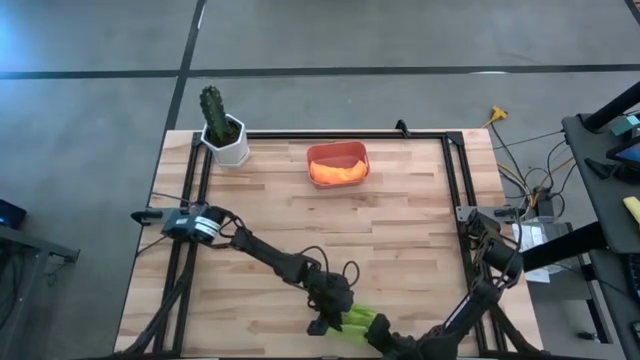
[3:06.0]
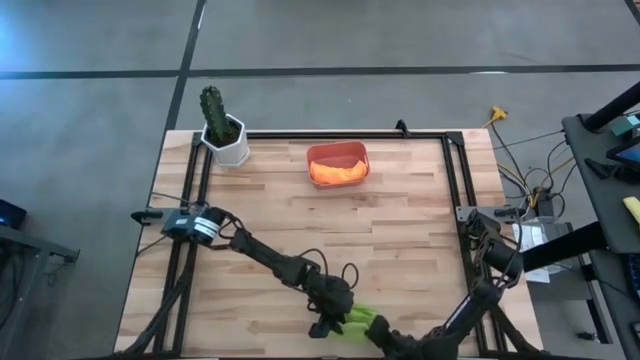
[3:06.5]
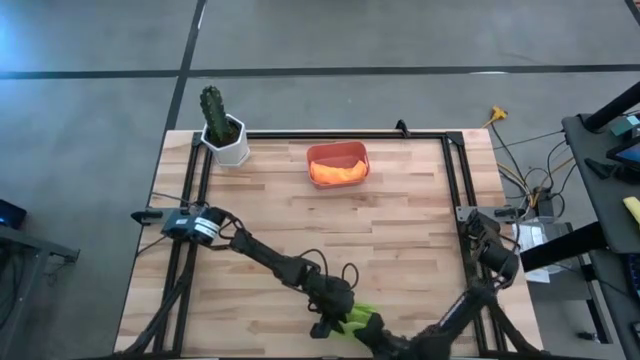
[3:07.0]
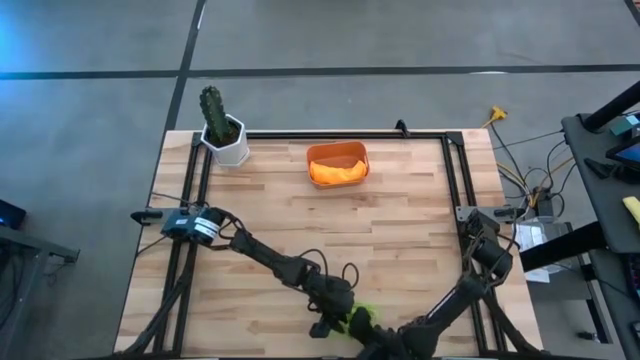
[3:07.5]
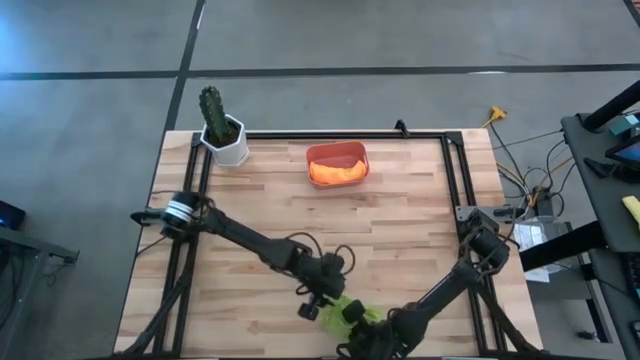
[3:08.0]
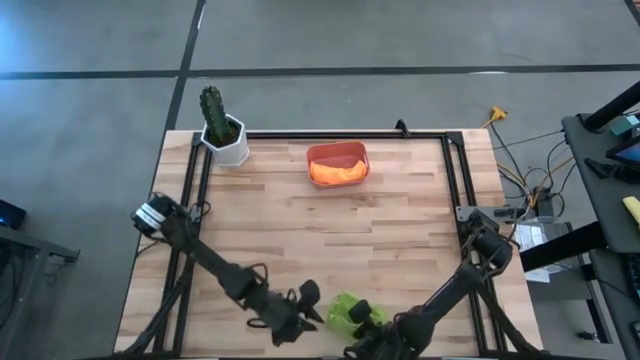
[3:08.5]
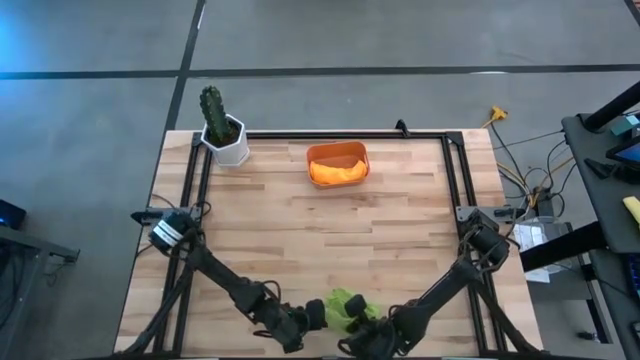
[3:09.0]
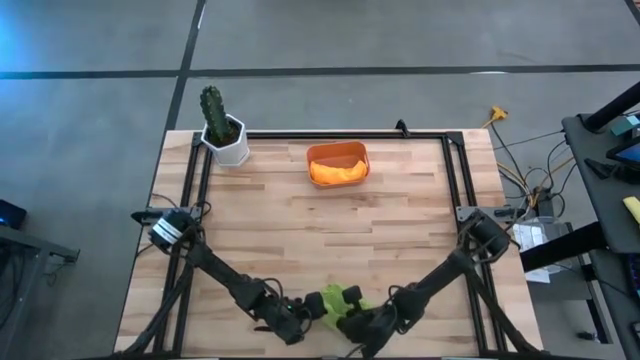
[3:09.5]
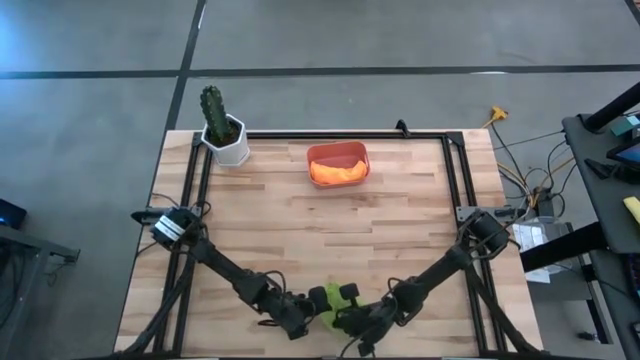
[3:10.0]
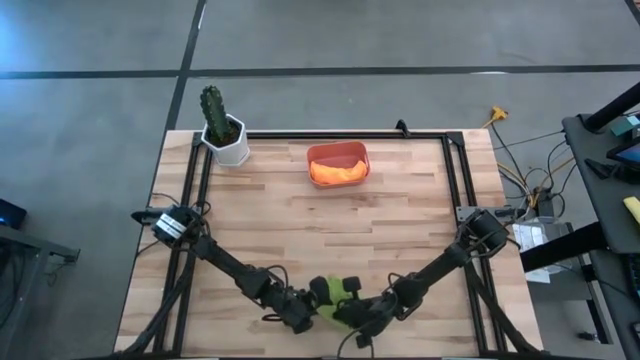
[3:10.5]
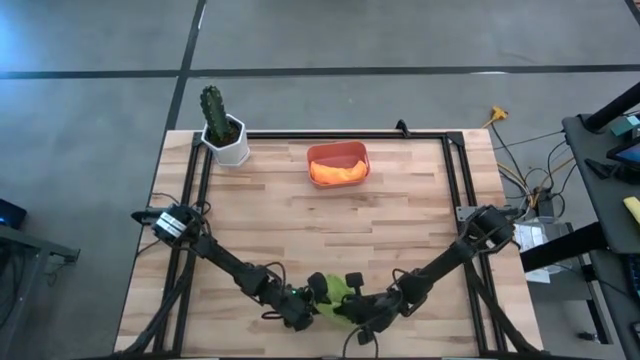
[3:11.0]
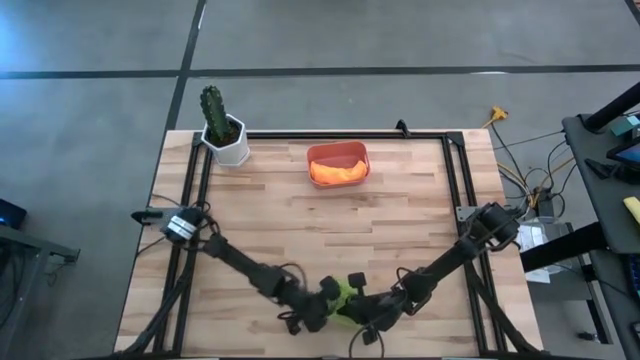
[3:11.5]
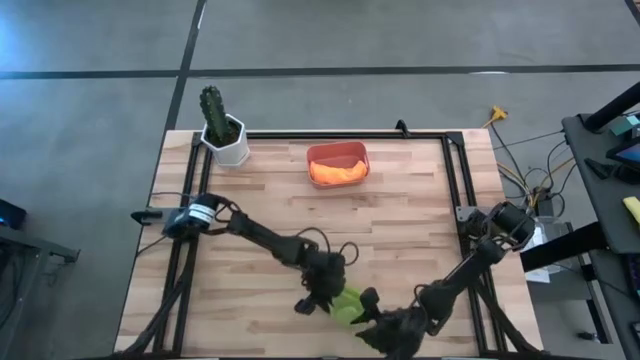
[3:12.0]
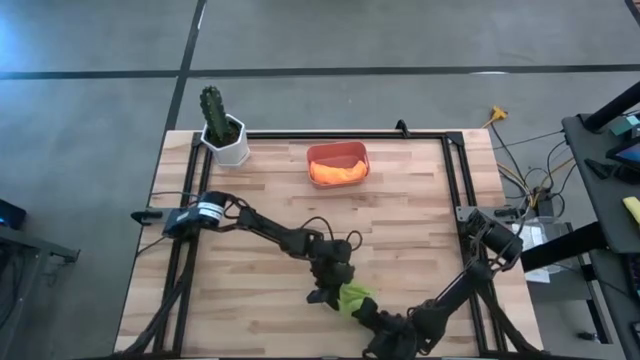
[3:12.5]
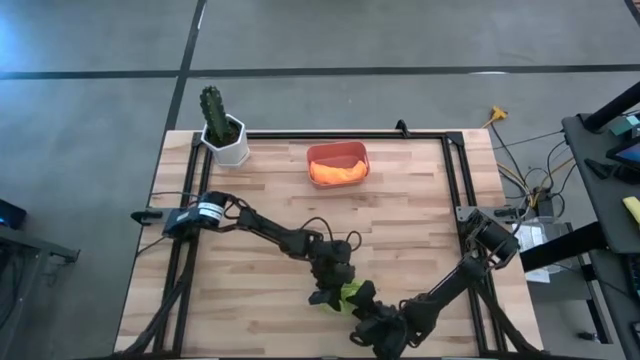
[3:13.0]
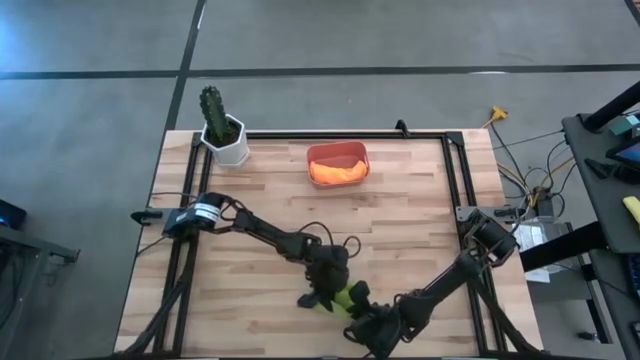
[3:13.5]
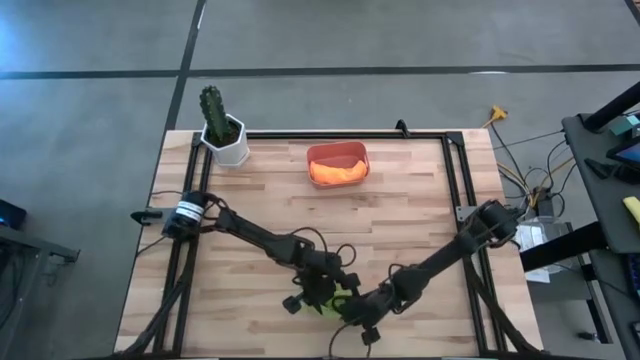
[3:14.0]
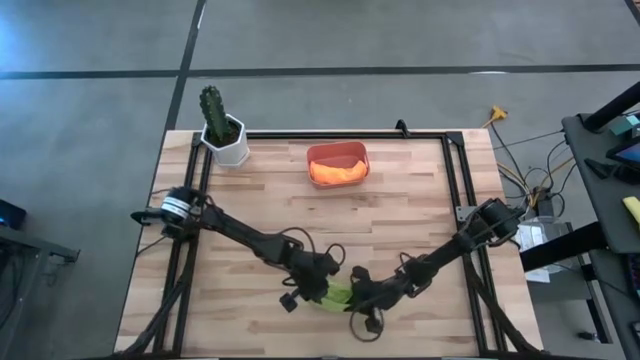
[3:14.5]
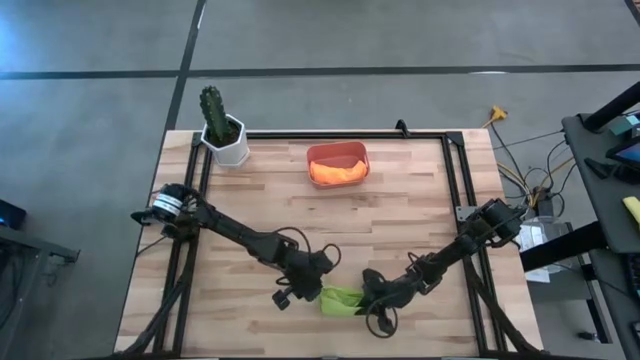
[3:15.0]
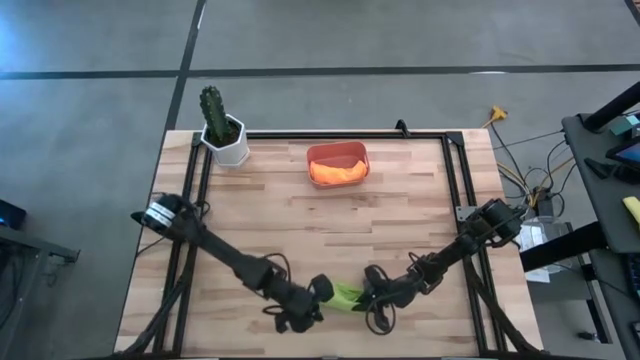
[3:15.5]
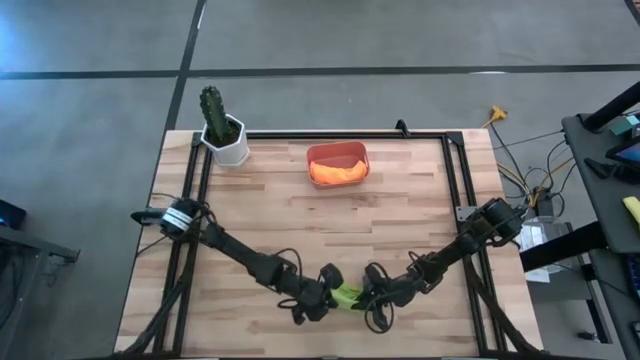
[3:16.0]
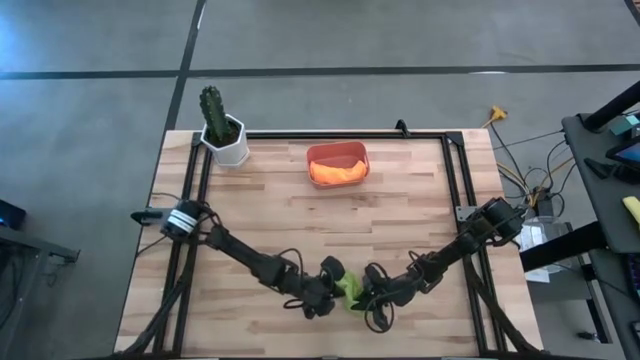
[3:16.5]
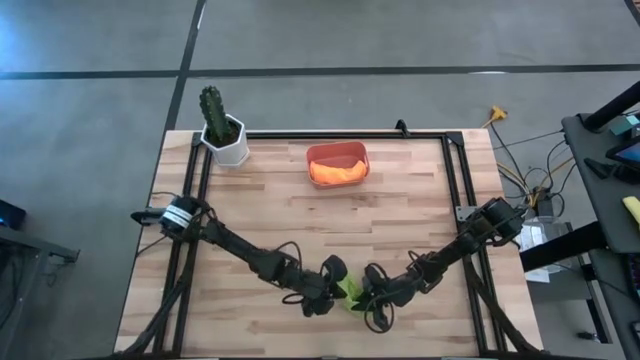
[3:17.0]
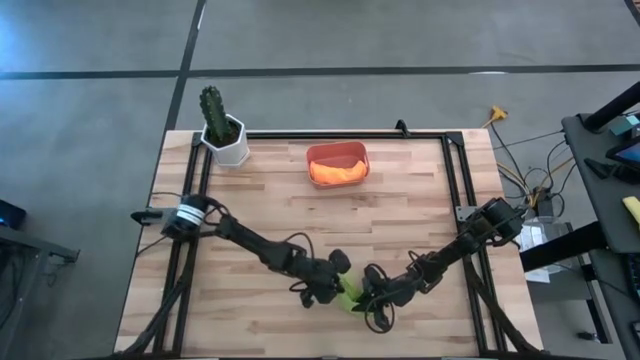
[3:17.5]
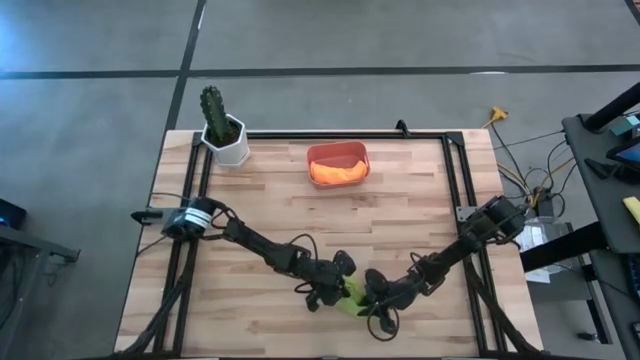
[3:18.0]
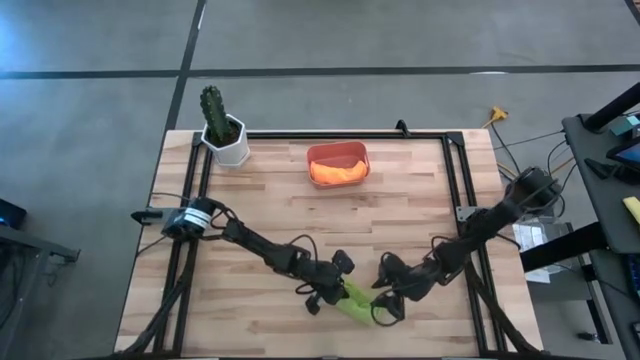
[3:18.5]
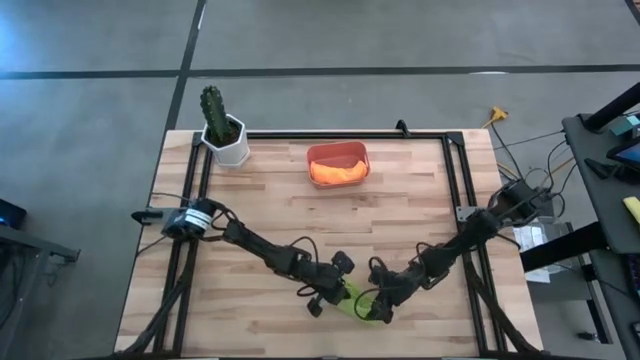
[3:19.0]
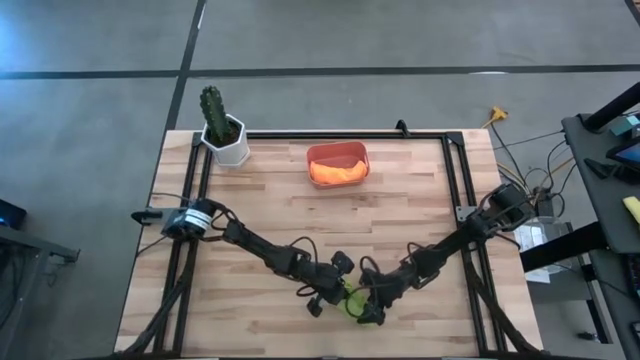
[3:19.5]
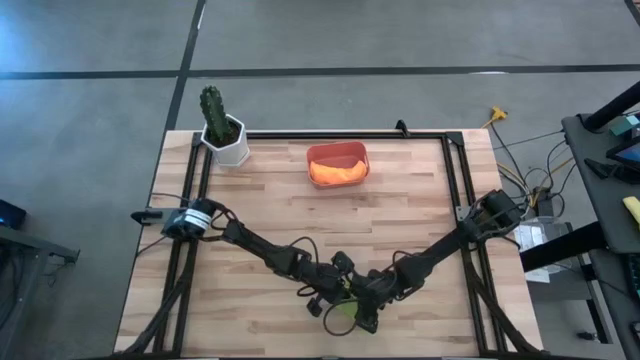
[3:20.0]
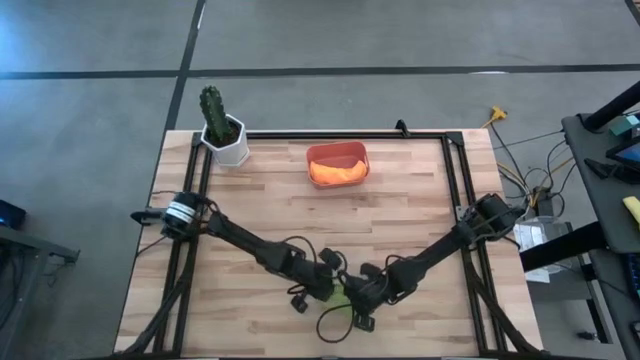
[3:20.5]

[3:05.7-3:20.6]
Task: Roll microfiber towels into tight, uniform cylinder then place into a basket
Roll the green microfiber cloth

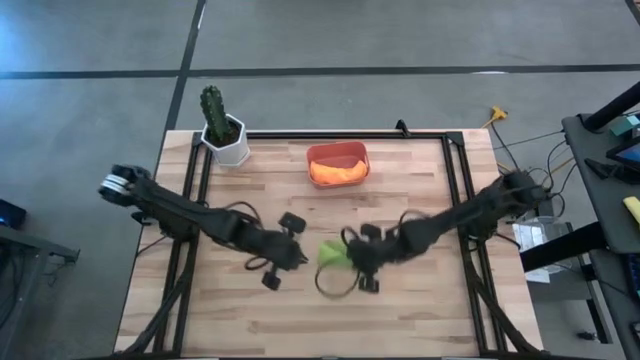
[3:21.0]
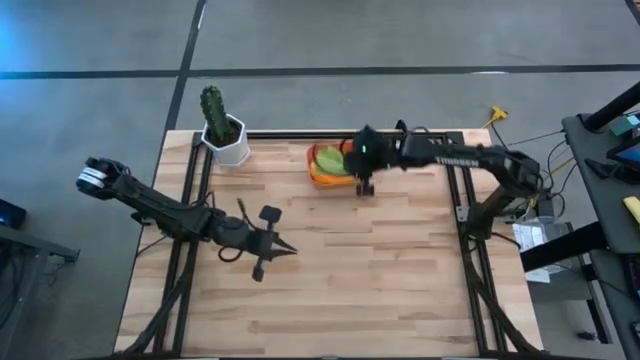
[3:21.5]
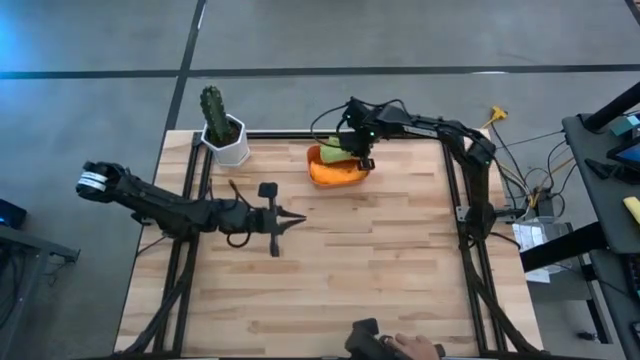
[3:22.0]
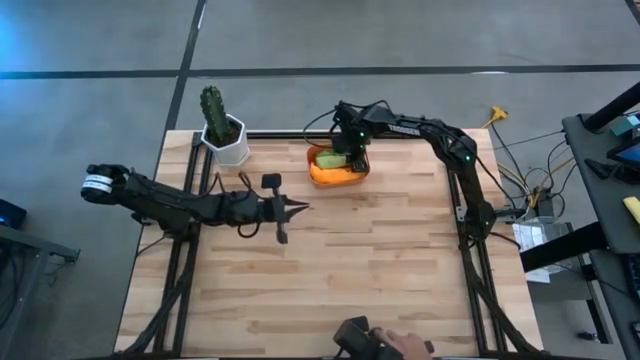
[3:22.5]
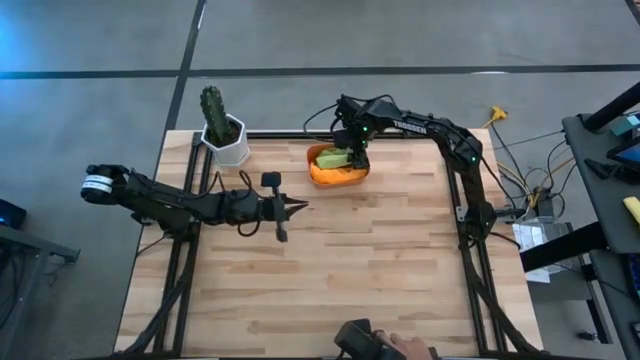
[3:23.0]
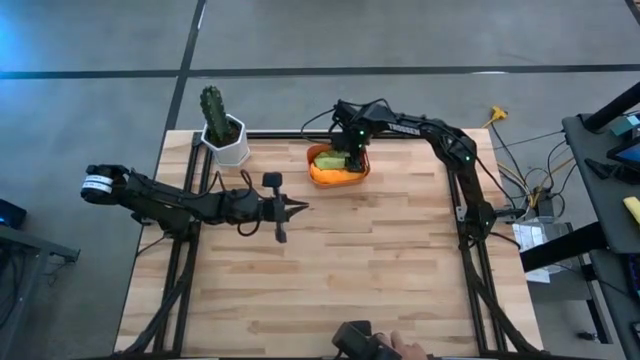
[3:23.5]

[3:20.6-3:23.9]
Put the green microfiber cloth into the orange bin

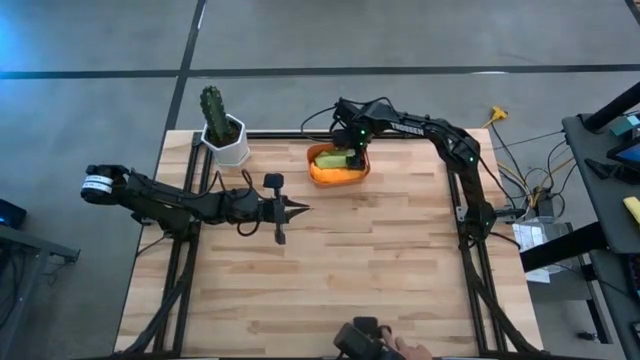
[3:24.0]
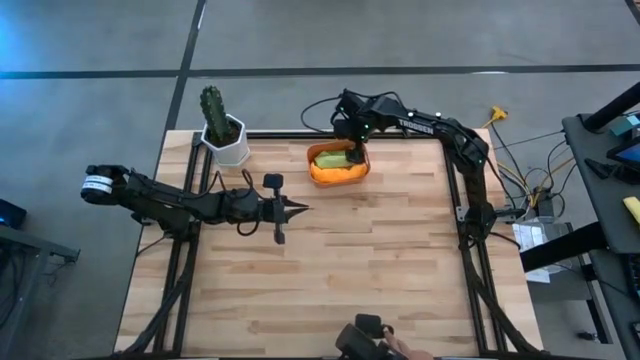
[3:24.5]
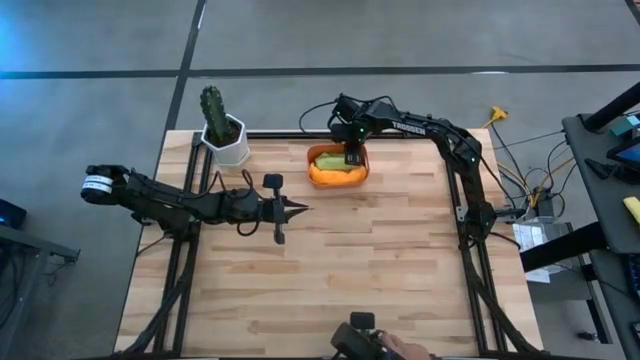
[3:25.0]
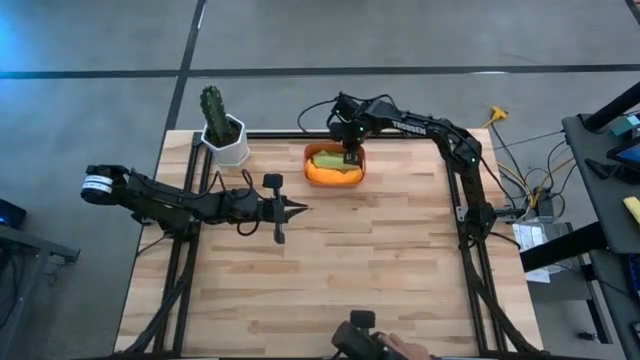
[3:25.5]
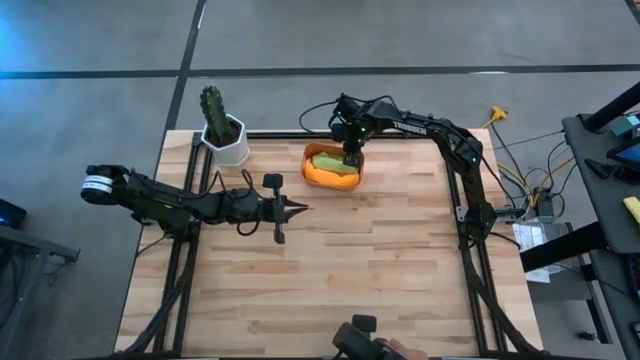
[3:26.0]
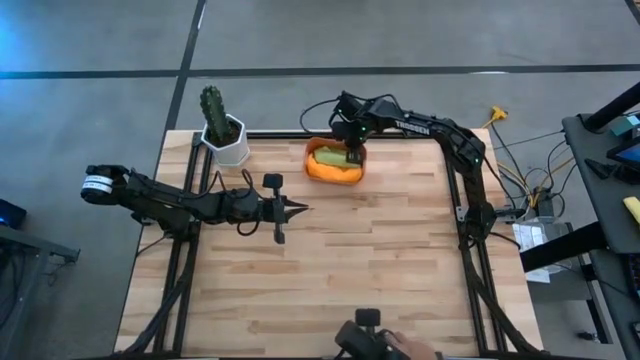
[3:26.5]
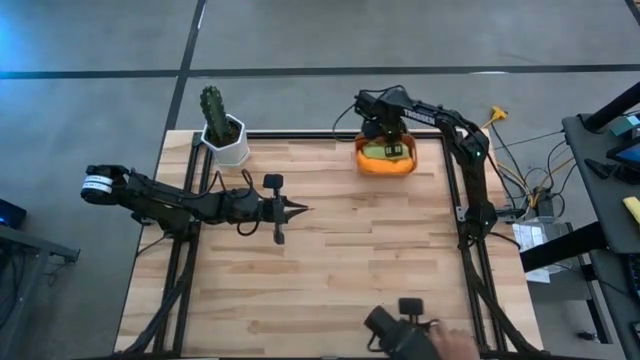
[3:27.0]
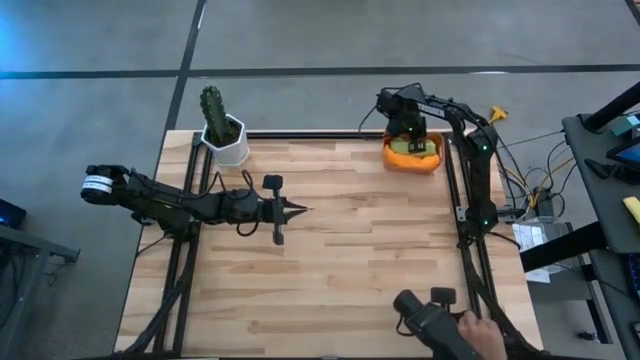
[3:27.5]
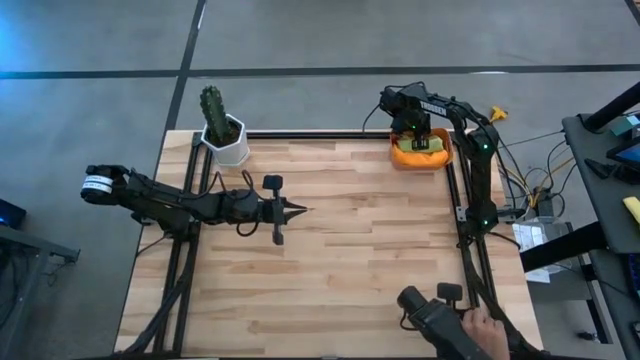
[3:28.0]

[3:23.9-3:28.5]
Move the orange bin to the top right of the table
